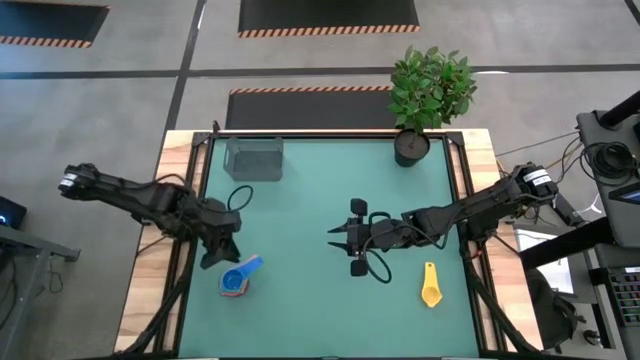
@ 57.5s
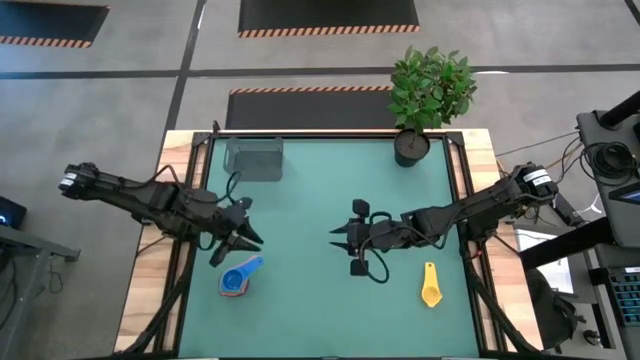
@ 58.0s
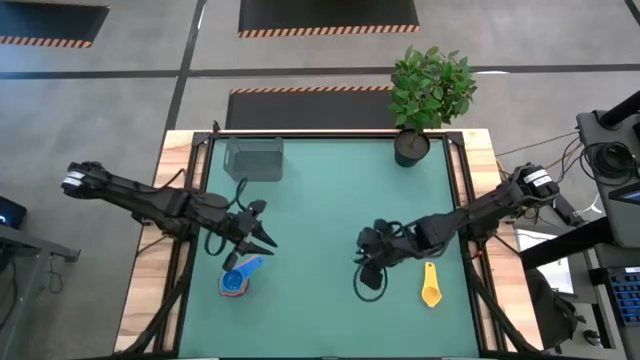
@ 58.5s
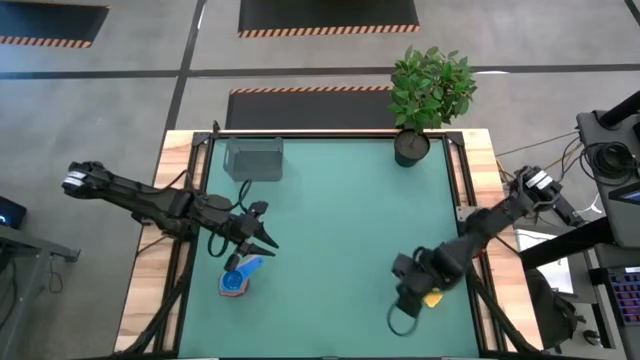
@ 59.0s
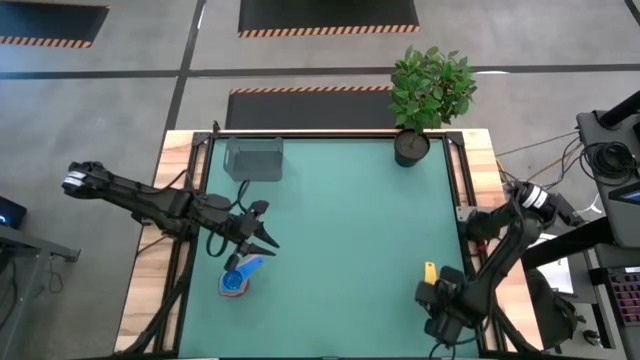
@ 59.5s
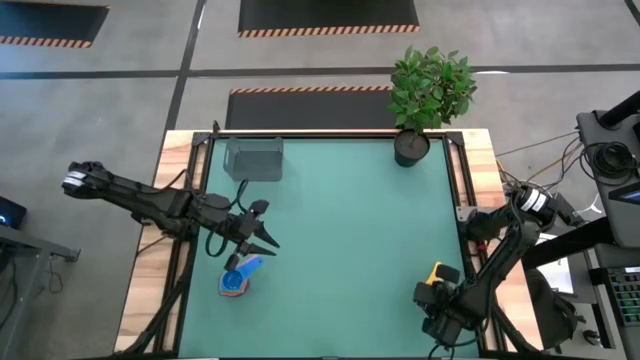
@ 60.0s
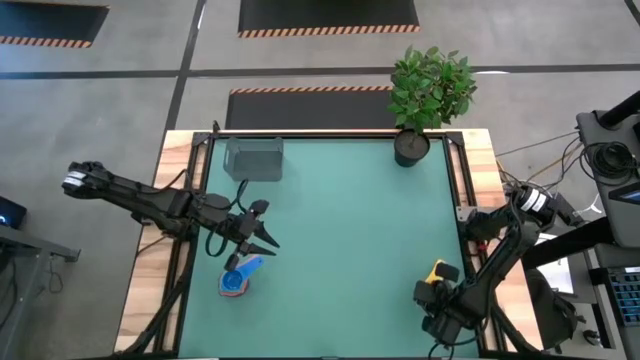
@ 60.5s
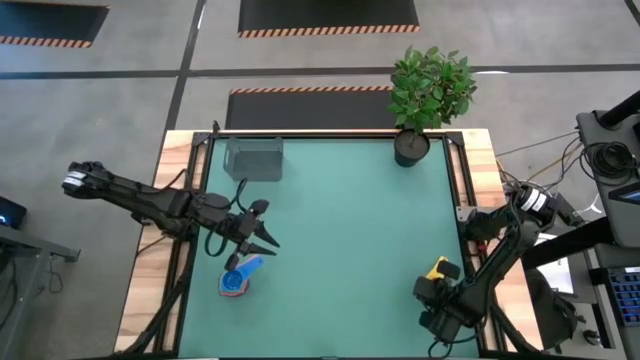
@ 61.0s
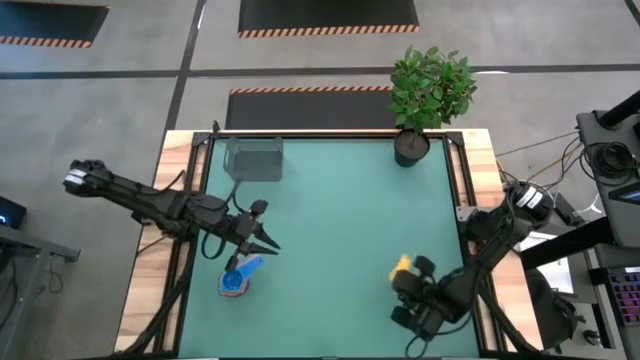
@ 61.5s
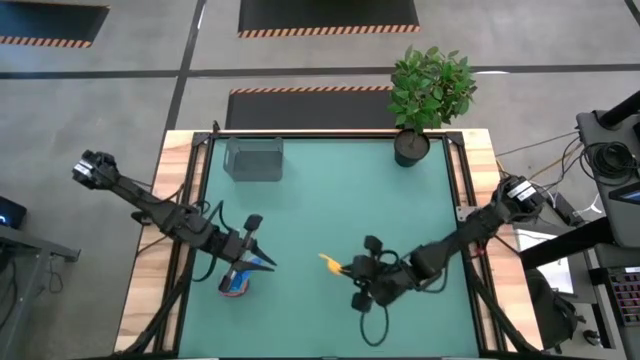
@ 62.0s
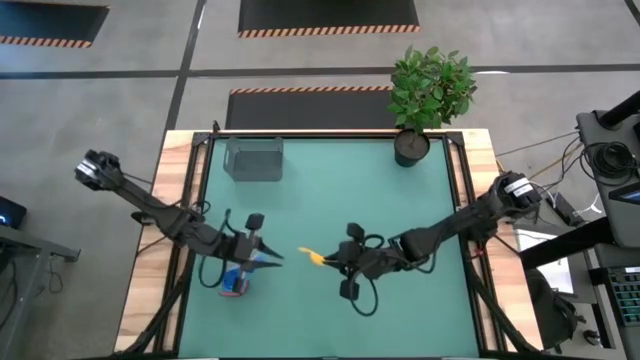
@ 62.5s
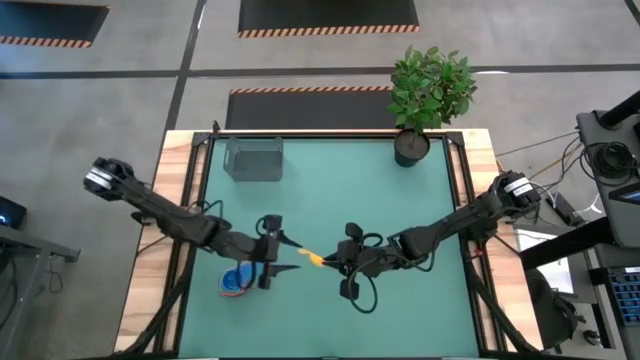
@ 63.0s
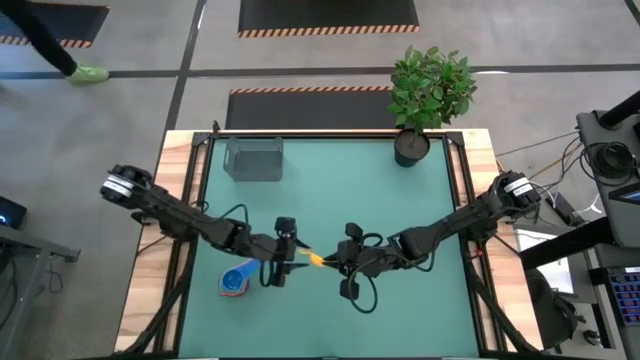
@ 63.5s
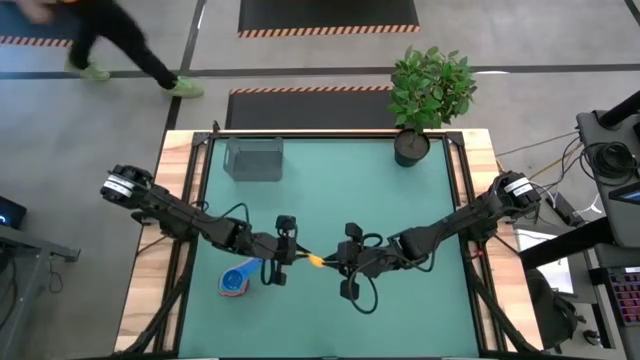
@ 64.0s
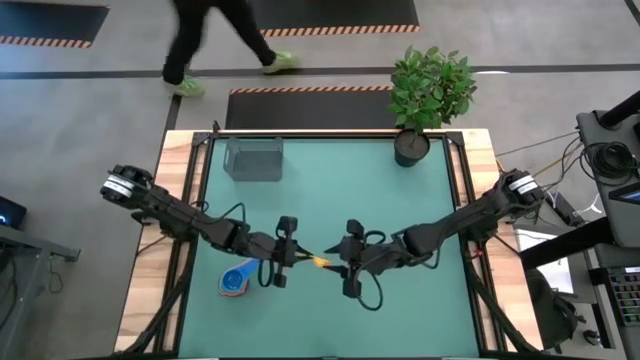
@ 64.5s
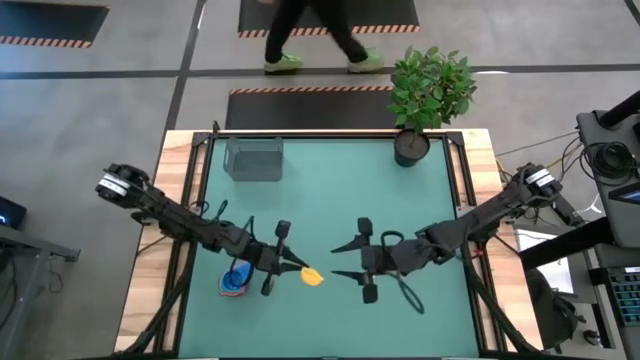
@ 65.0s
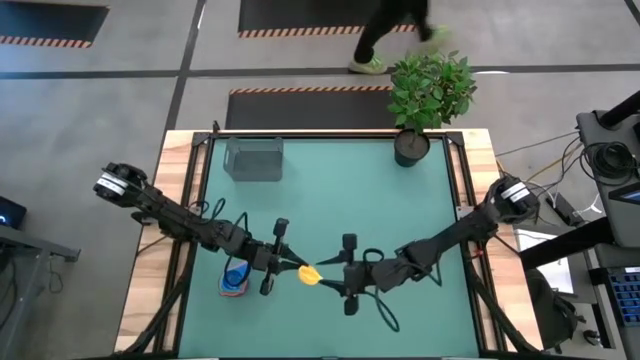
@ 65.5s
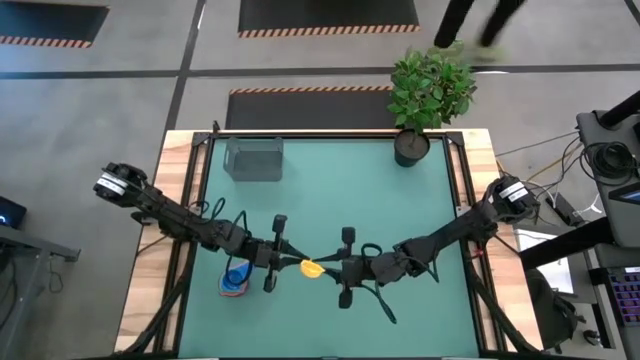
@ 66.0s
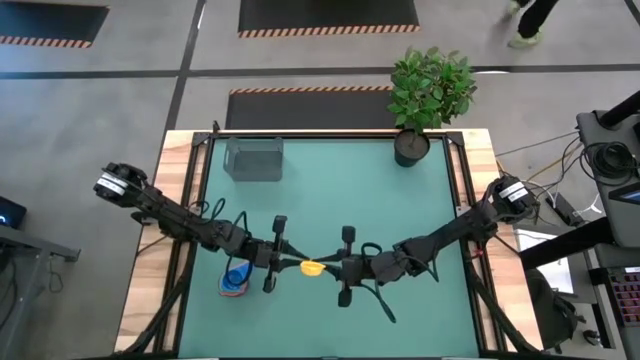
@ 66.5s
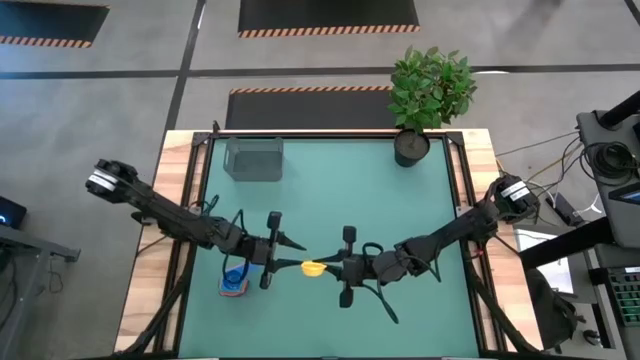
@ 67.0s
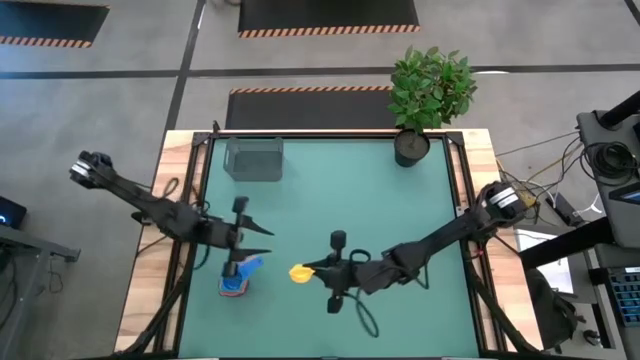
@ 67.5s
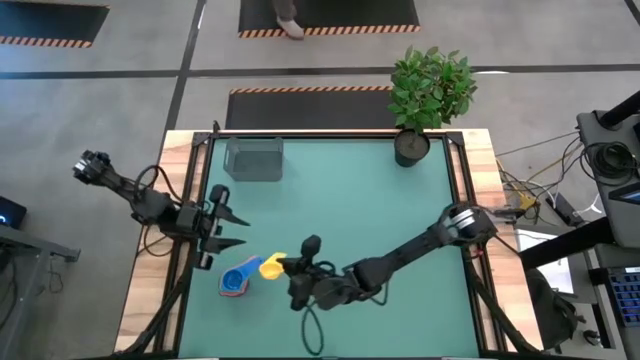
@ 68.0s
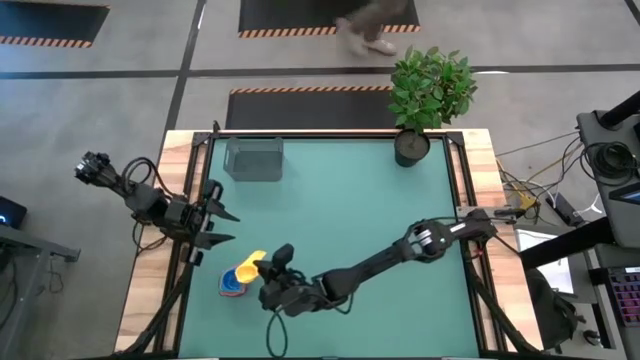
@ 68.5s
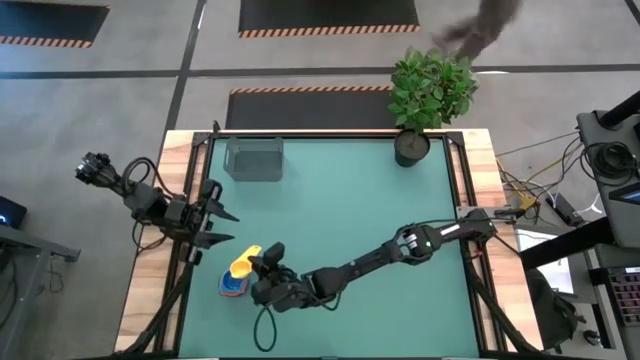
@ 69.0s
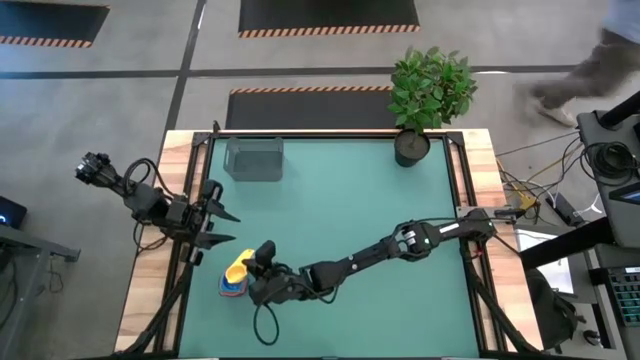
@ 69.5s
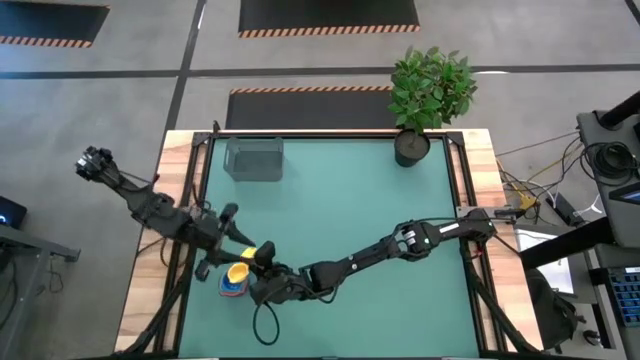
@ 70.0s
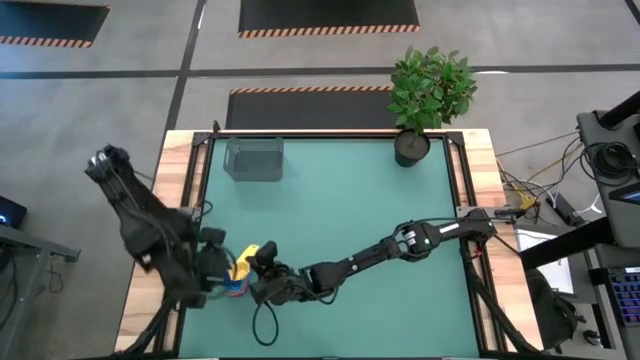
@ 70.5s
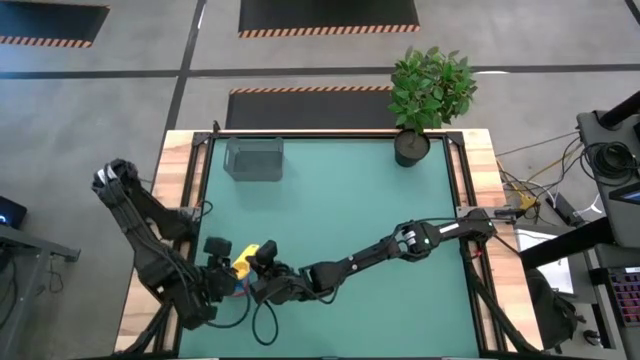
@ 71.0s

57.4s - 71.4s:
Task: Nest measuring cups in basket
Stack the yellow measuring cup on top of the blue measuring cup

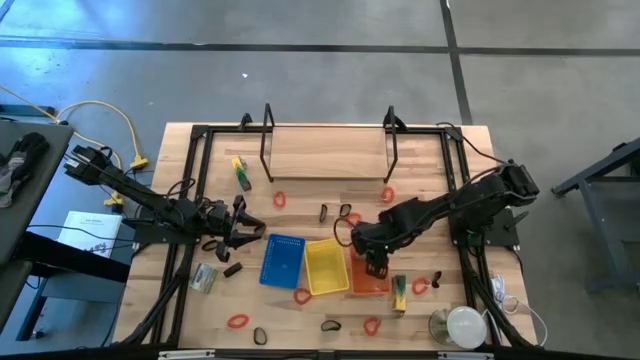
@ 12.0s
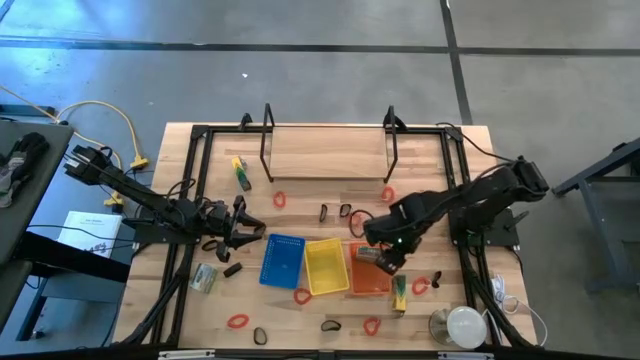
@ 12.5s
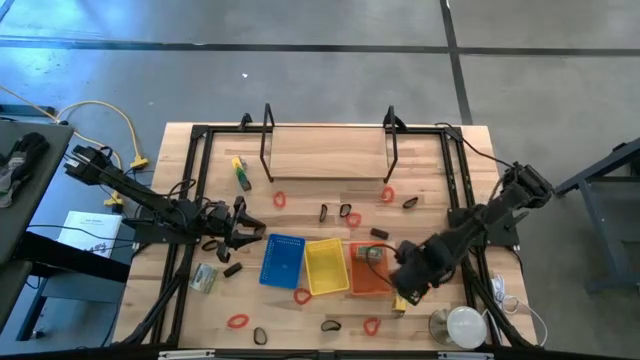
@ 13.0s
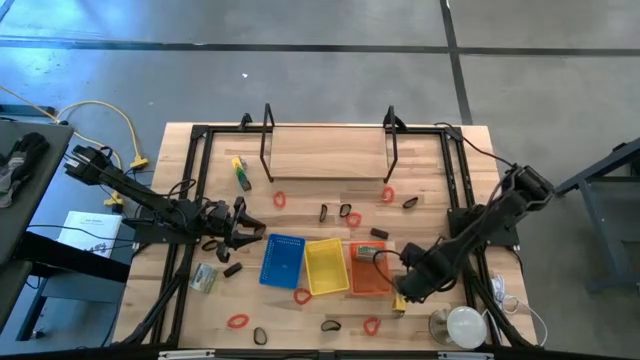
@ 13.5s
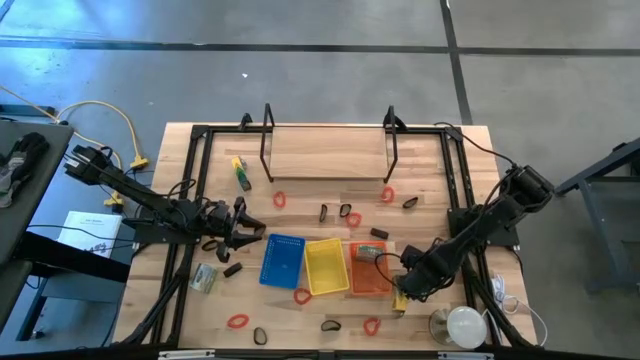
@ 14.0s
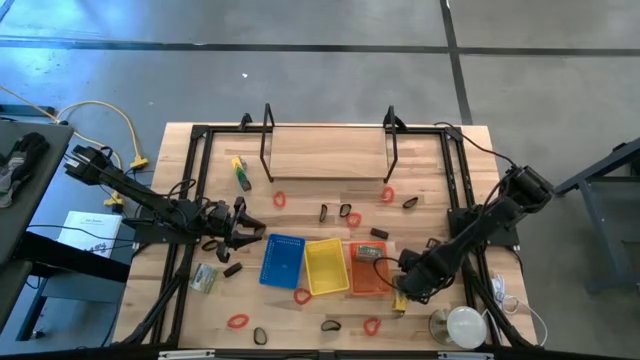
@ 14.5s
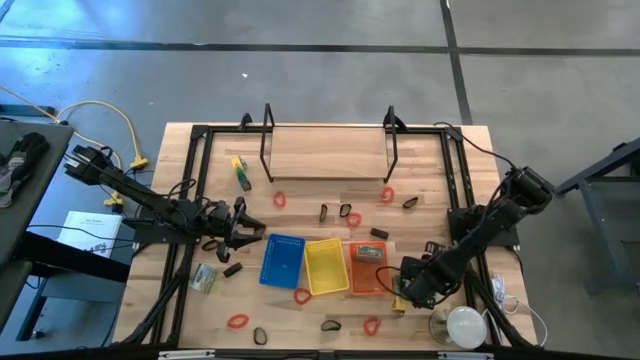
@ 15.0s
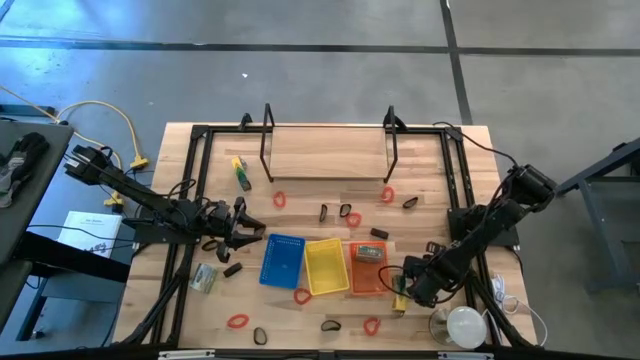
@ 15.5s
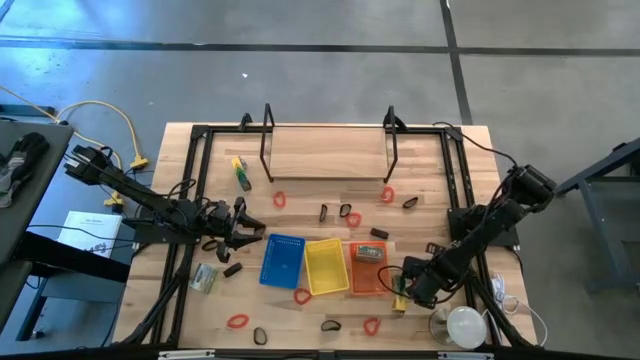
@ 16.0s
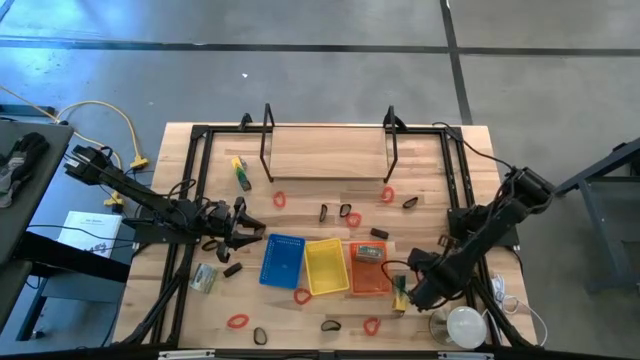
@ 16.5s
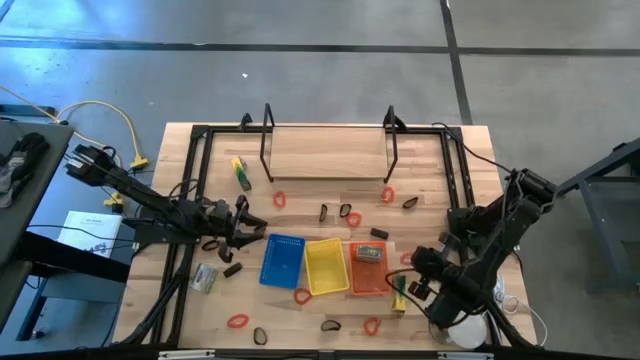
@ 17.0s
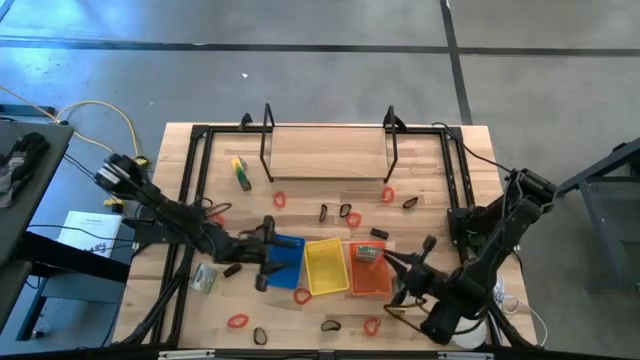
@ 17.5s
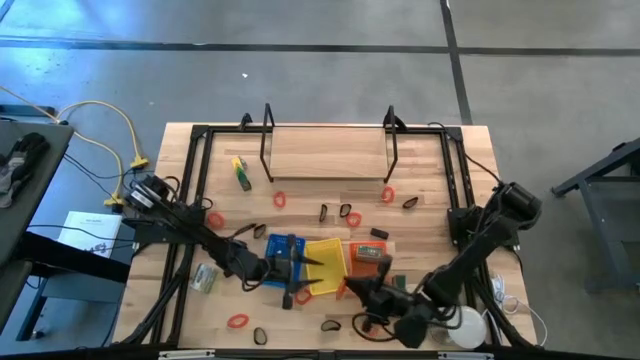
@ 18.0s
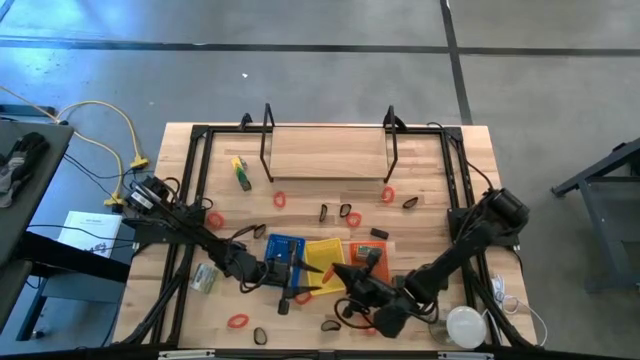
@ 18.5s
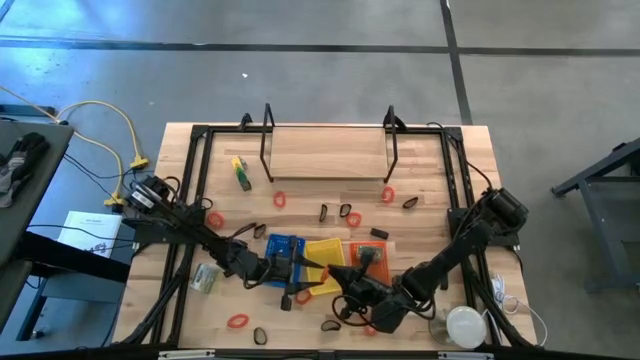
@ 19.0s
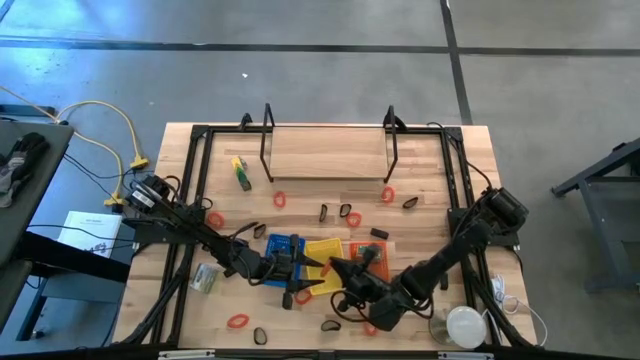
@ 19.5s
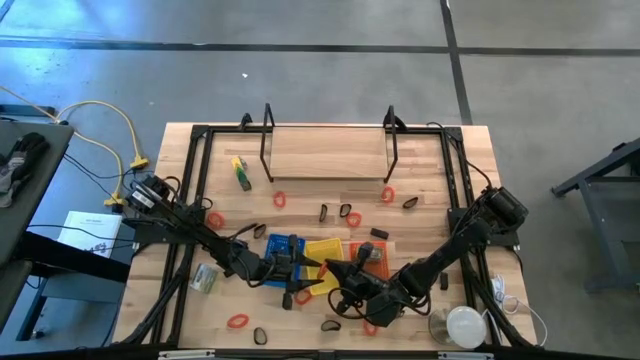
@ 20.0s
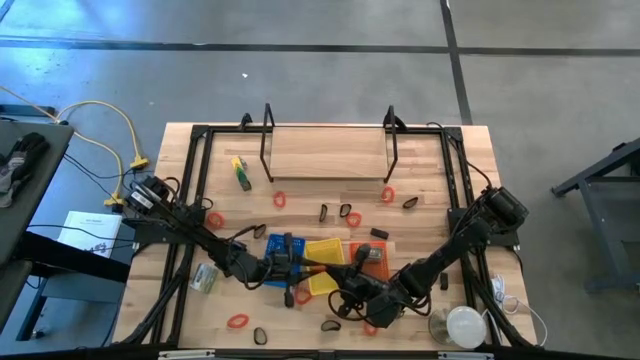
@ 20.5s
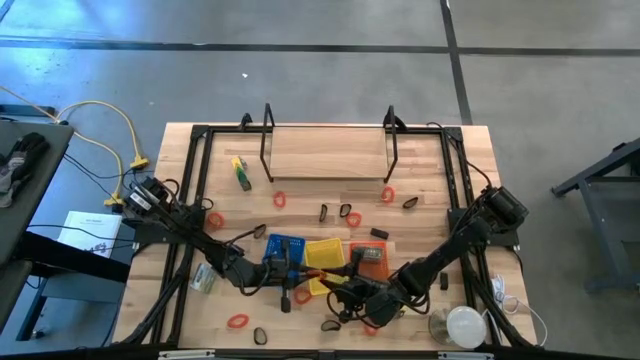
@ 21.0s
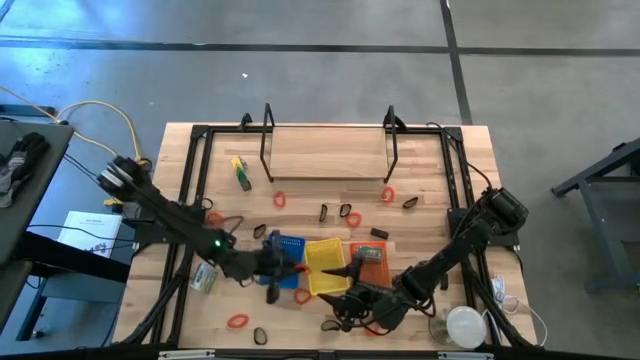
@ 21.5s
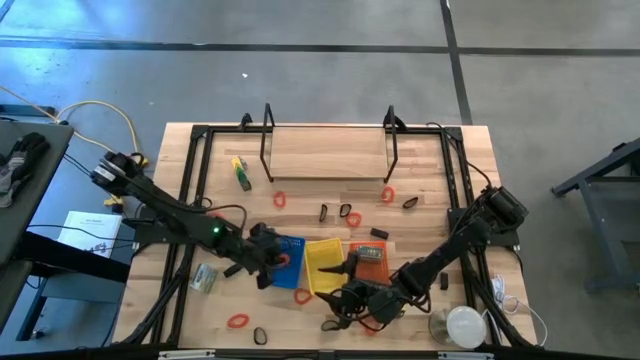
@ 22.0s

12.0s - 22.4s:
Task: Pick & Place Office Desk Supplies
Put the orange spring keychain into the blue basket
